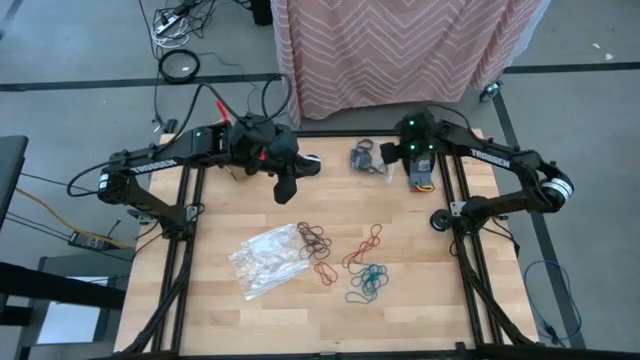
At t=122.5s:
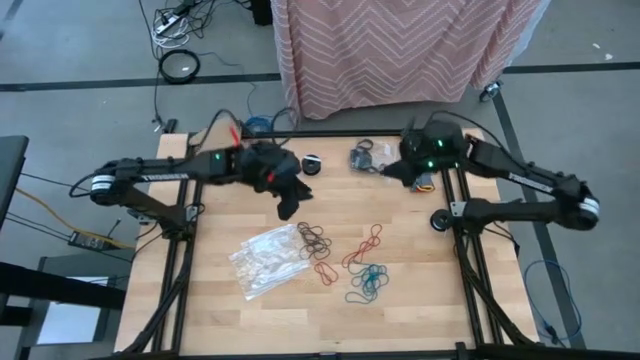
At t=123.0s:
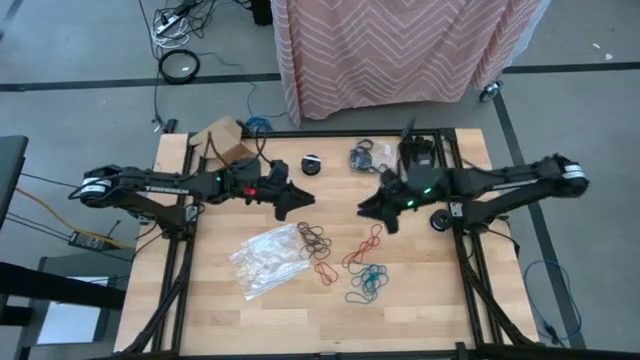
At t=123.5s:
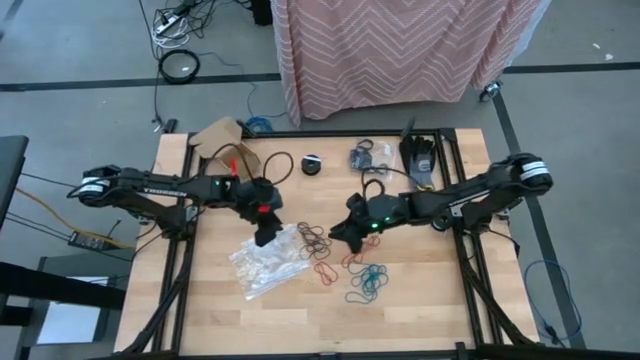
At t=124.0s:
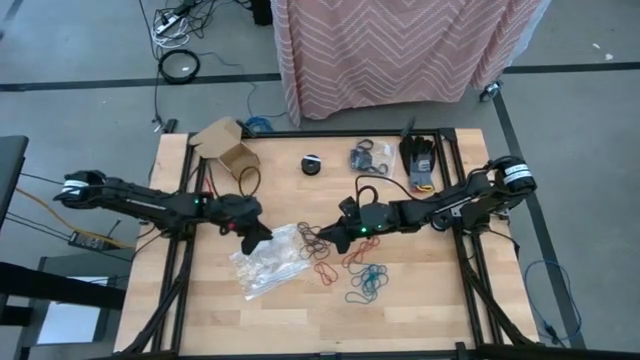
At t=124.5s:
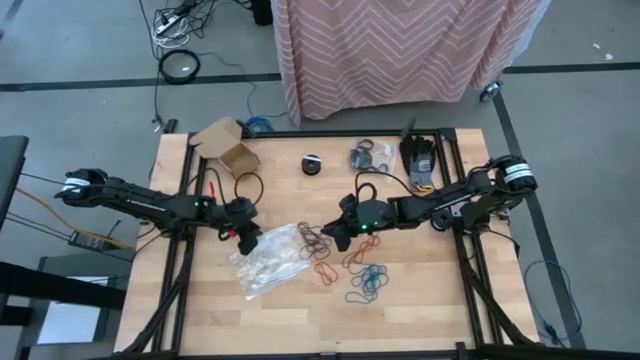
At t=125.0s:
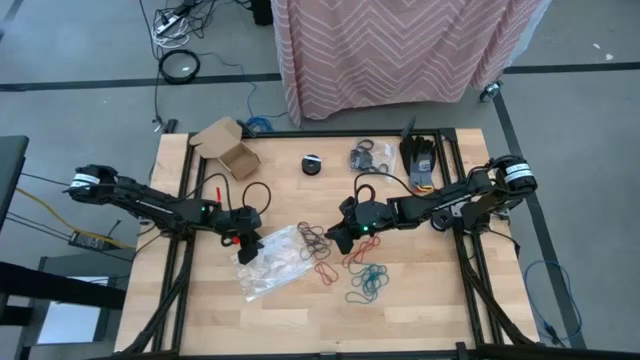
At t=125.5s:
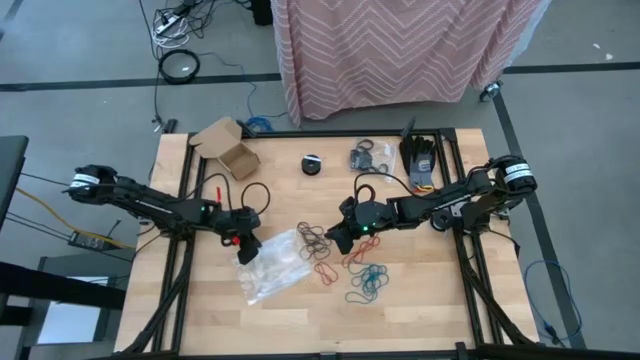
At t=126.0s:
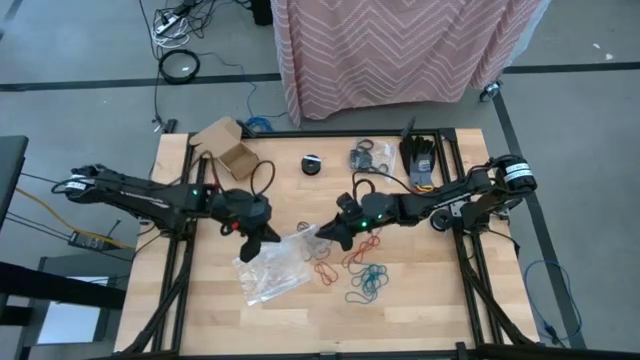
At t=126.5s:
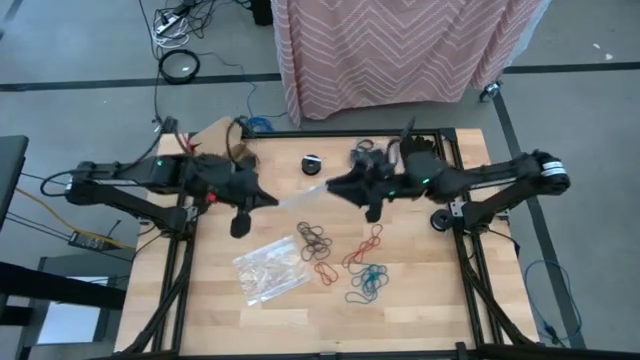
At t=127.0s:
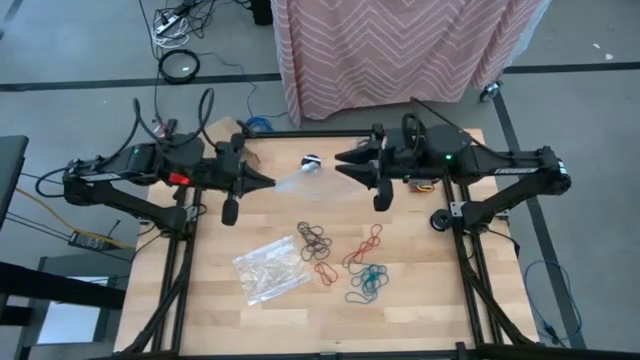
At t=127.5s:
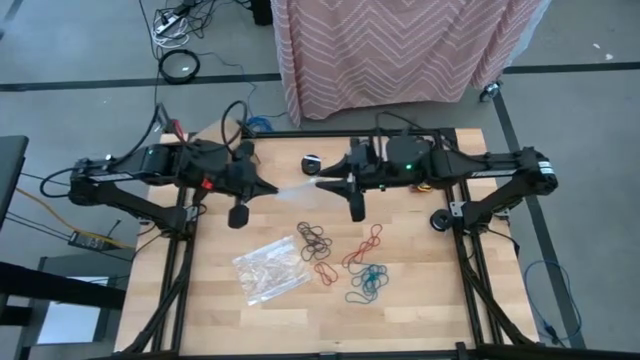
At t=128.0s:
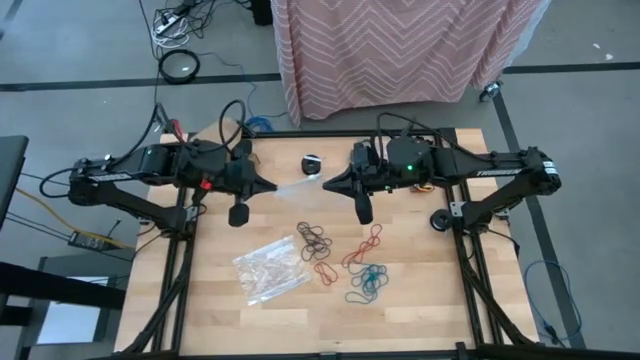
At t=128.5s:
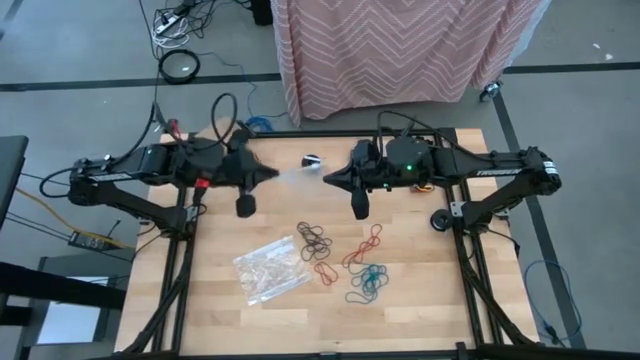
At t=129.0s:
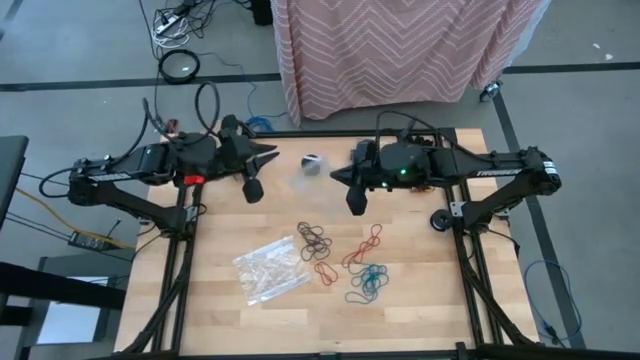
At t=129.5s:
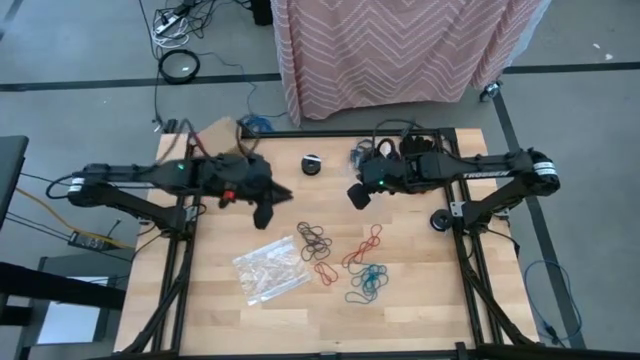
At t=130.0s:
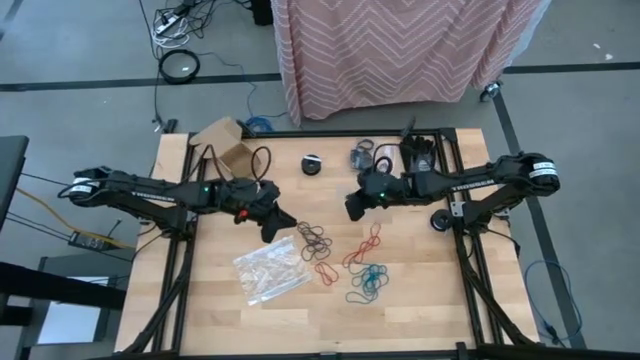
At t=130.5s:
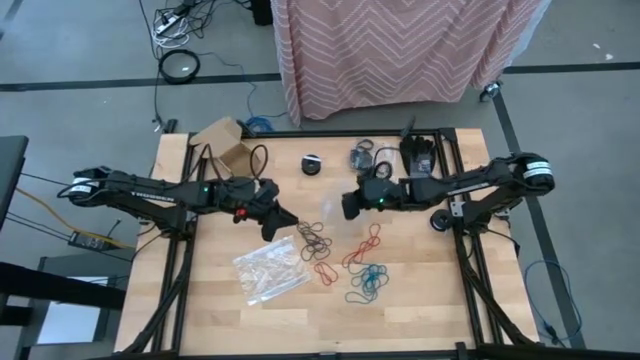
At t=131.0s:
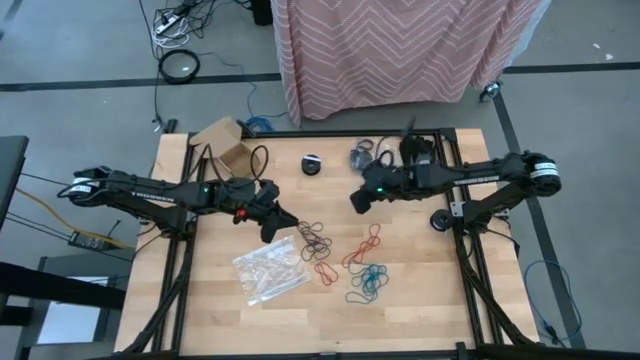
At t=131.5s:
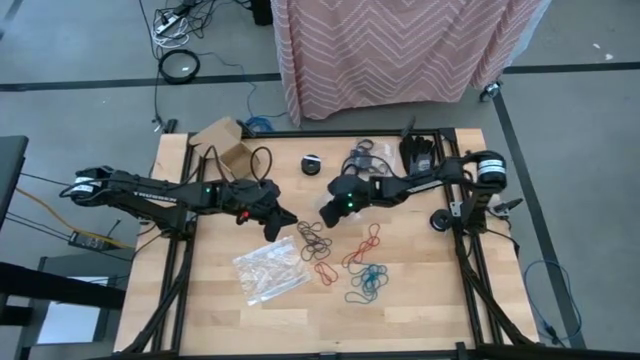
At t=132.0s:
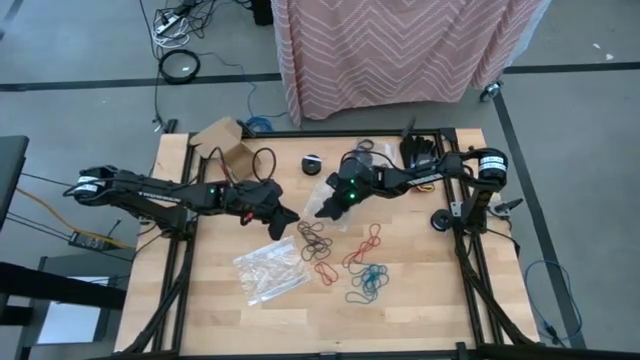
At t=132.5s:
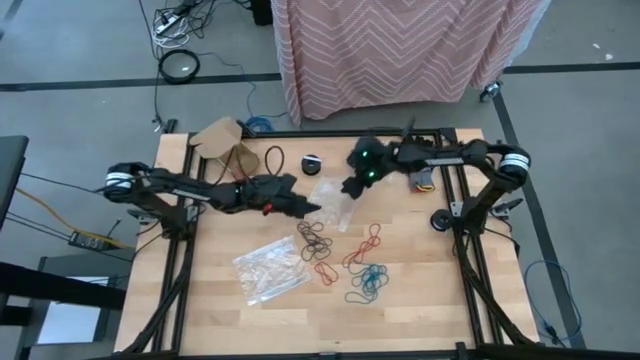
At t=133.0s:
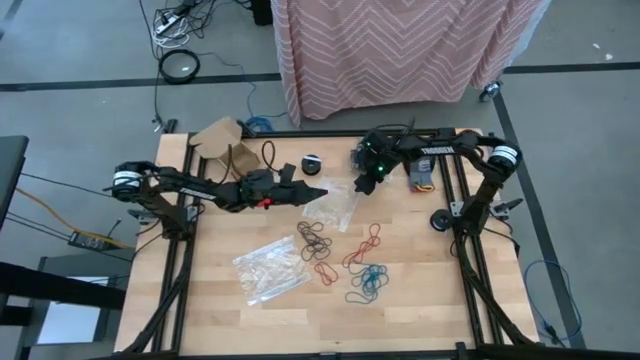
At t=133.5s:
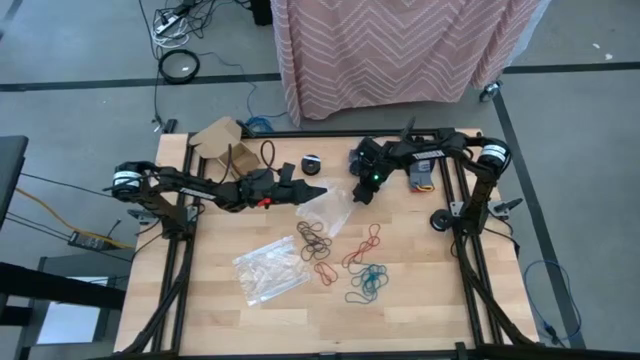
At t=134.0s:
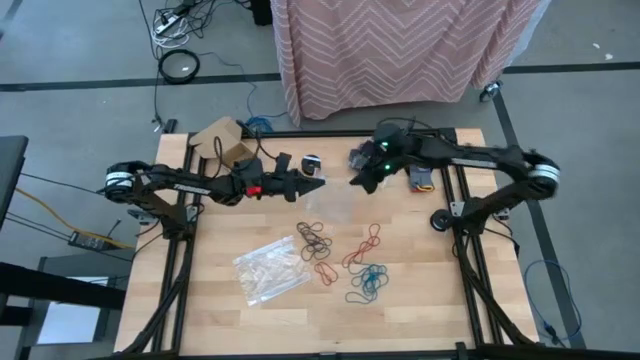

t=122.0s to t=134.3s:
Task: Sort rubber bands
Open the transparent zip bag

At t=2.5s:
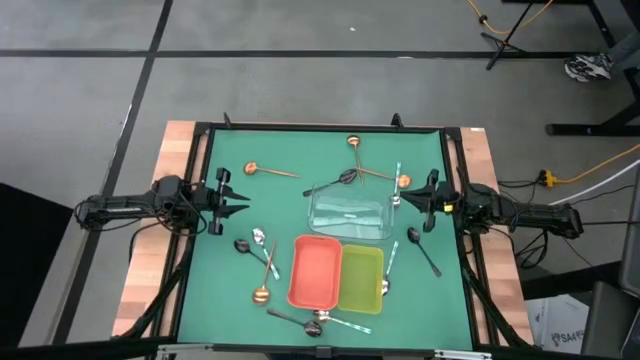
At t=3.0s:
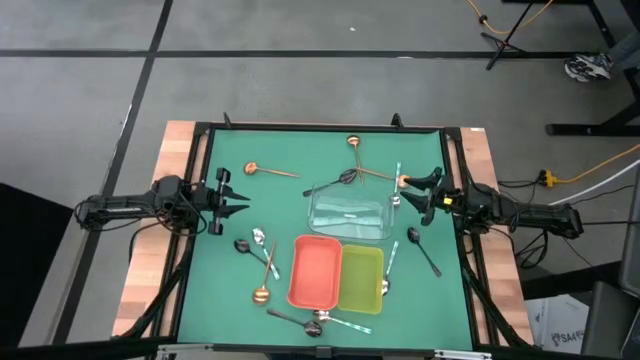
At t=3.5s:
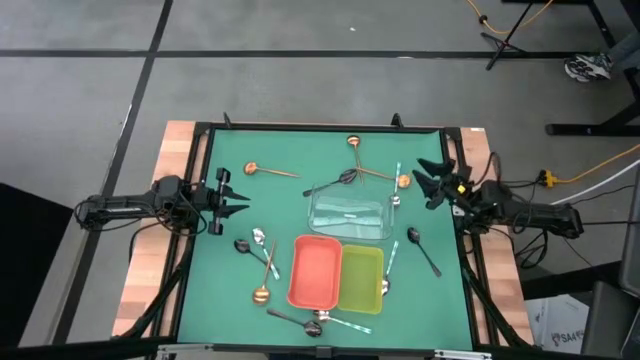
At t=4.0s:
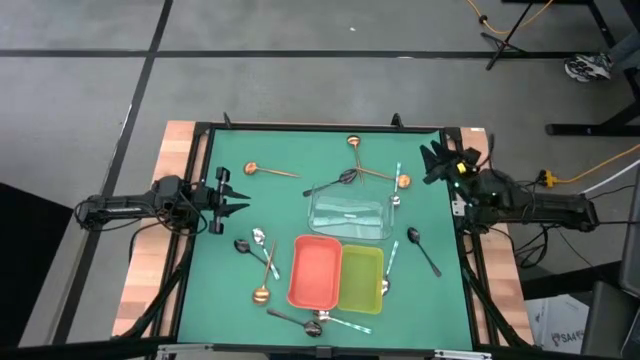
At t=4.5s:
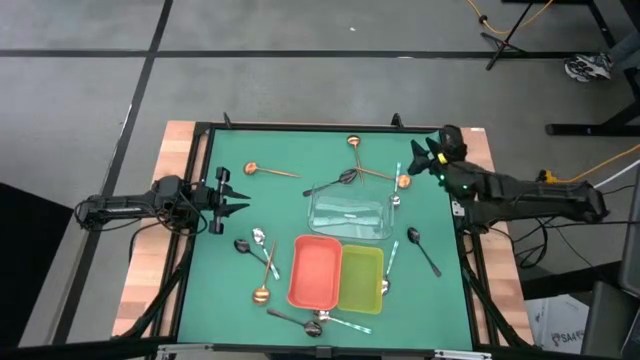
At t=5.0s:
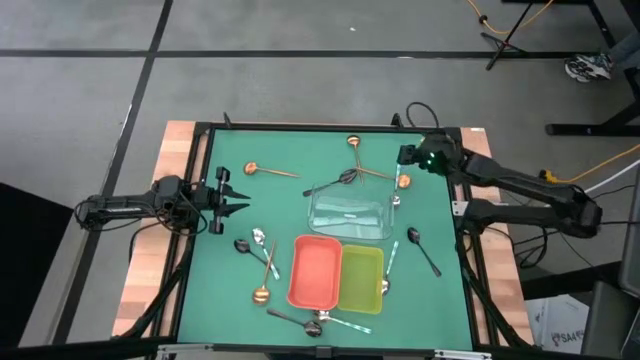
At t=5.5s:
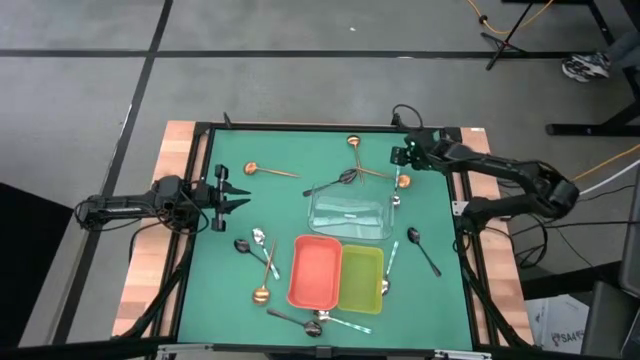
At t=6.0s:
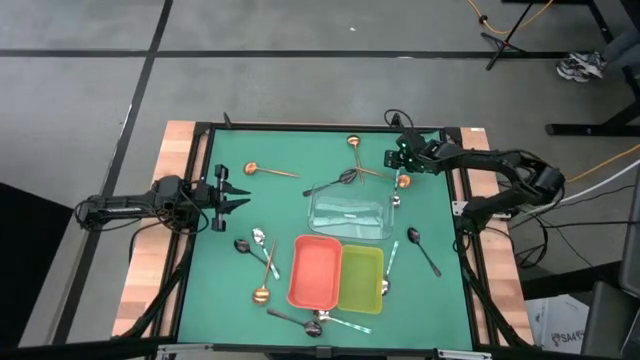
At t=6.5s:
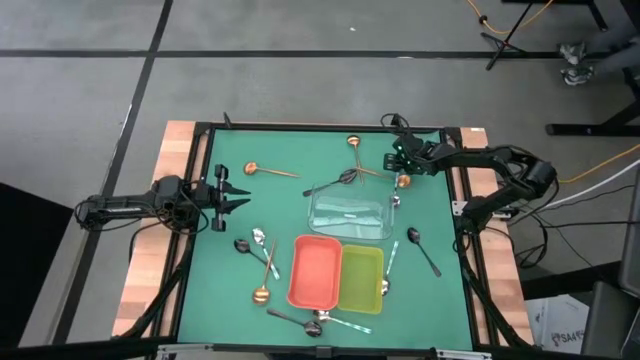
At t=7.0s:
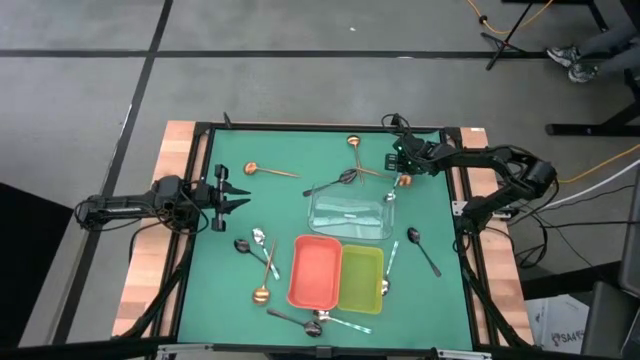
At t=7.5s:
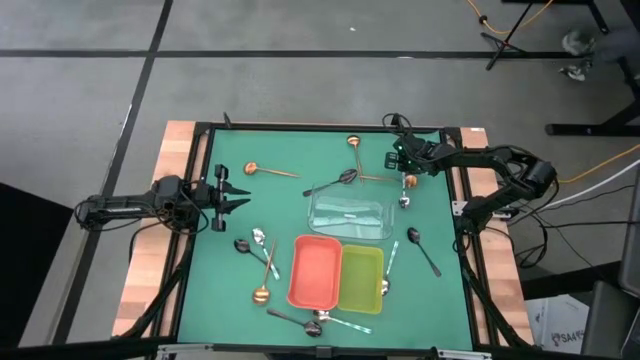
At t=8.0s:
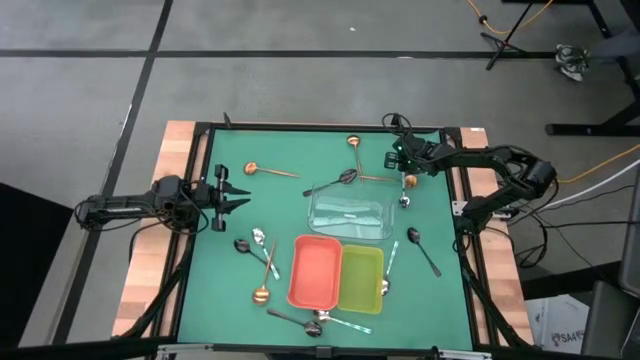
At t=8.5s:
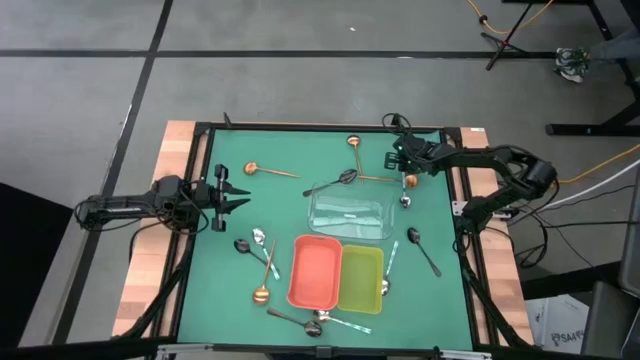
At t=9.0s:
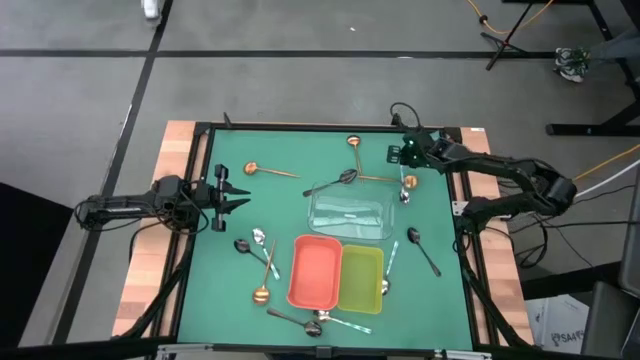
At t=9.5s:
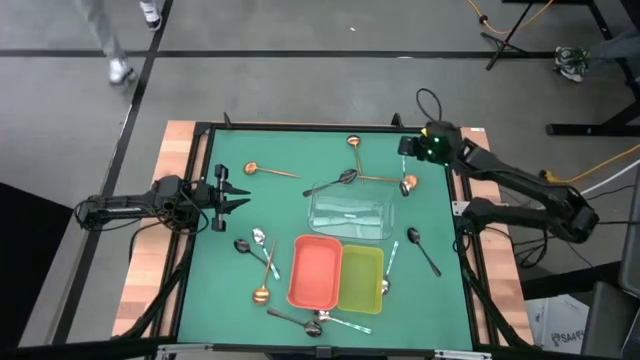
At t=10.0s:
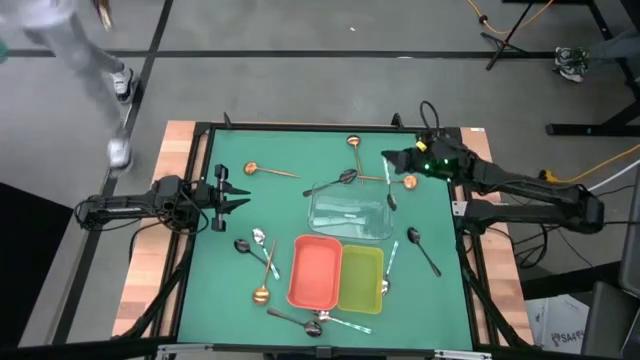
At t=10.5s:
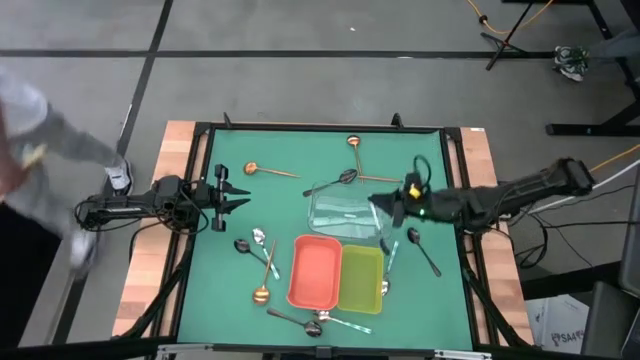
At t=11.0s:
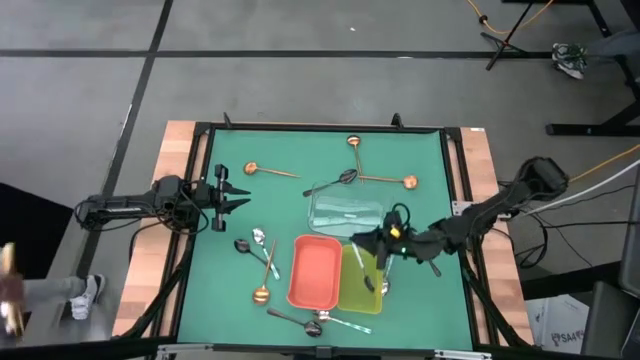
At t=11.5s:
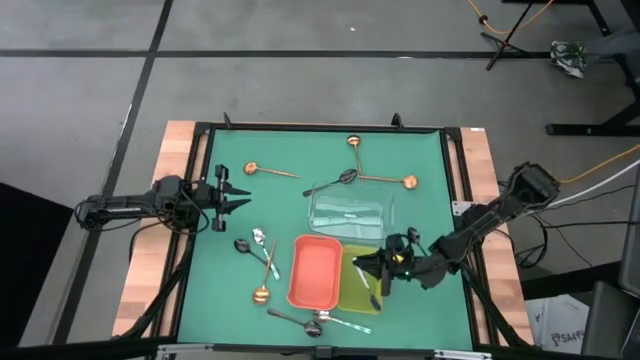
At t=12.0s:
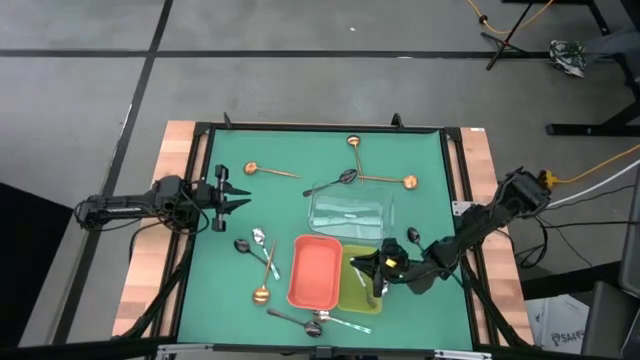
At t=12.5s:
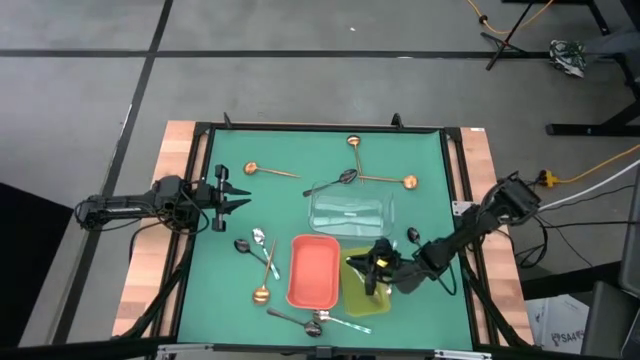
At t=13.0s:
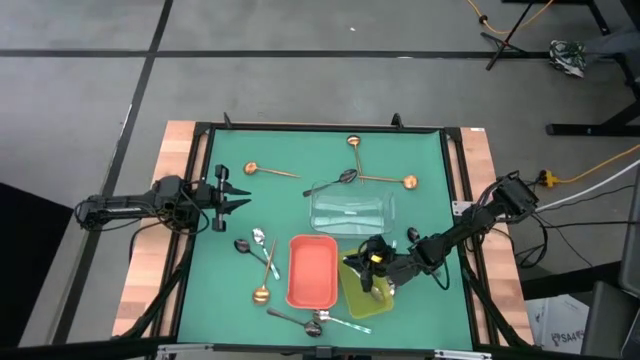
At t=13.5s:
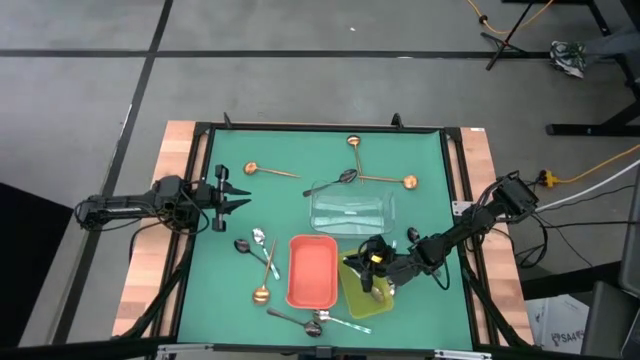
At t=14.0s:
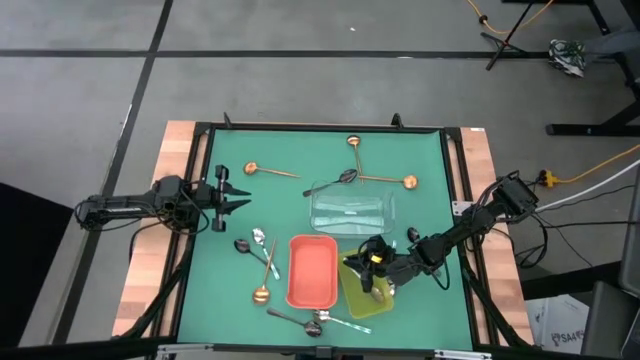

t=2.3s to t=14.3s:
Task: Sort silverware by color (type)
Put the blue patterned spoon into the yellow bin
